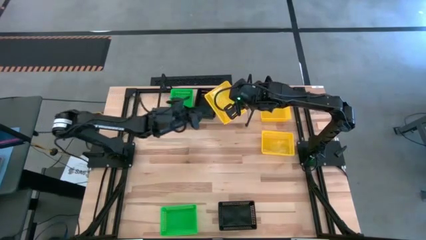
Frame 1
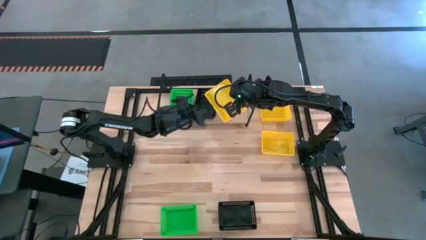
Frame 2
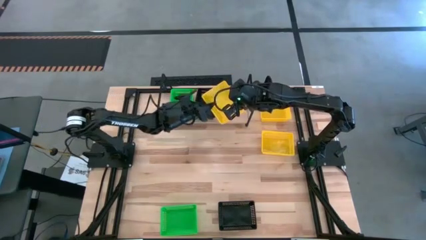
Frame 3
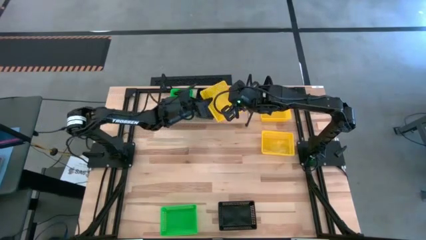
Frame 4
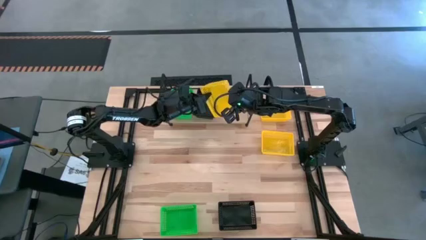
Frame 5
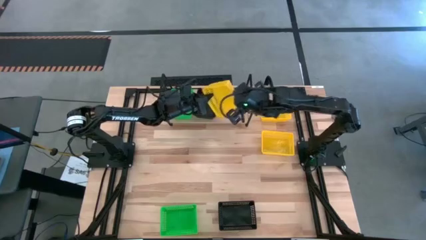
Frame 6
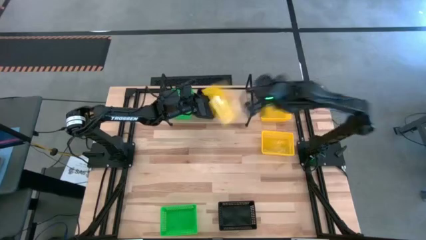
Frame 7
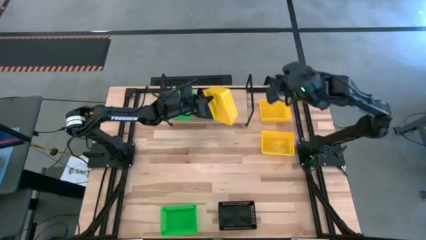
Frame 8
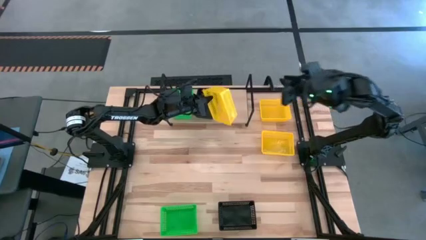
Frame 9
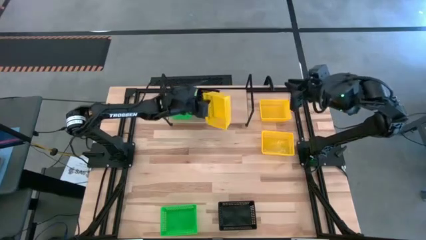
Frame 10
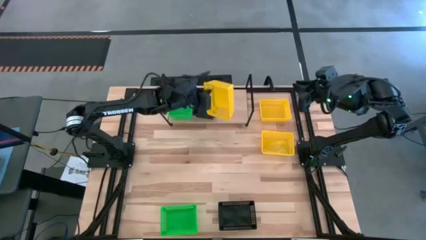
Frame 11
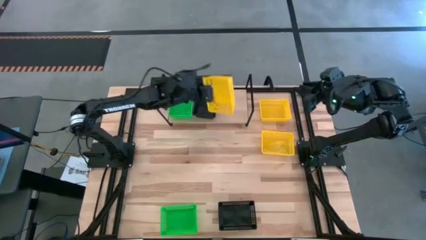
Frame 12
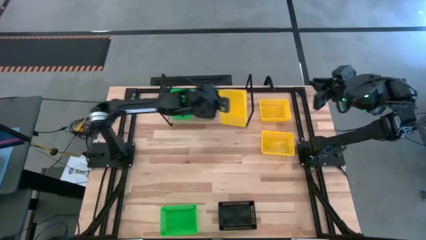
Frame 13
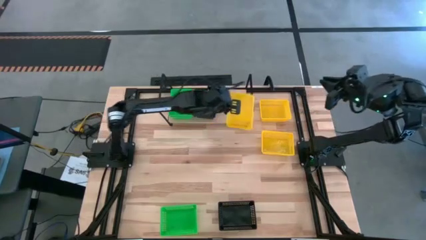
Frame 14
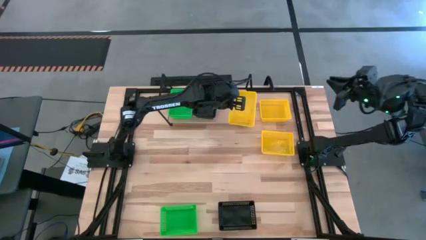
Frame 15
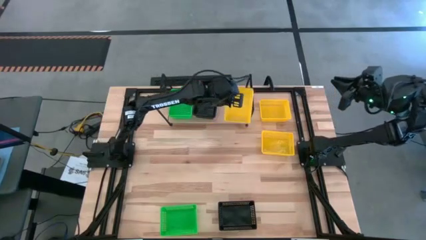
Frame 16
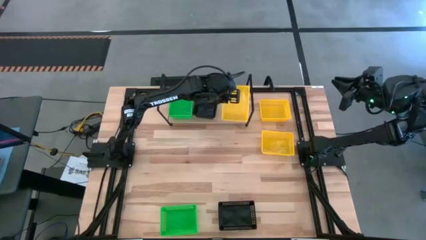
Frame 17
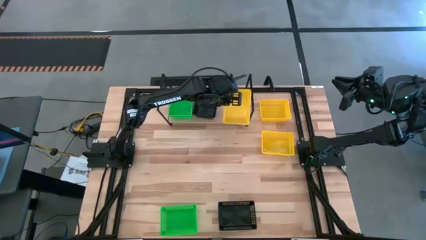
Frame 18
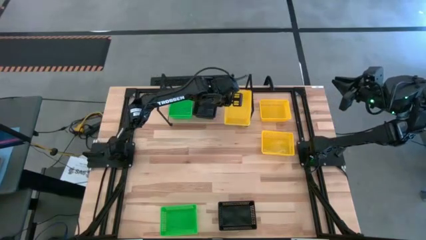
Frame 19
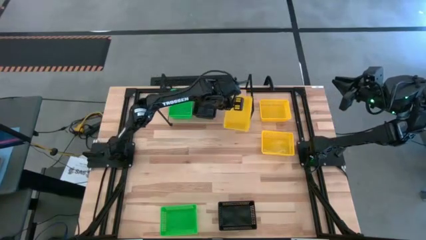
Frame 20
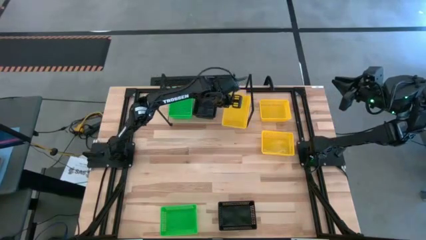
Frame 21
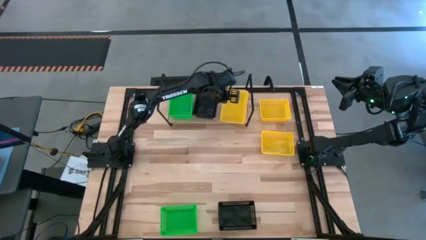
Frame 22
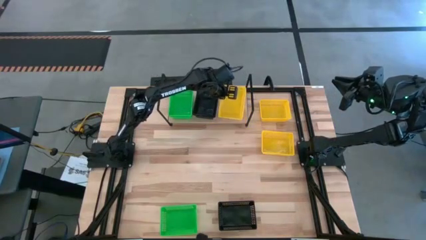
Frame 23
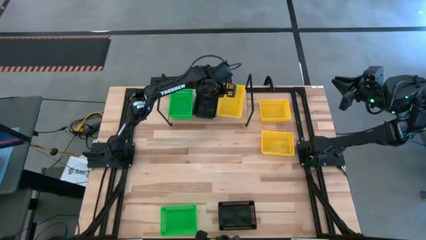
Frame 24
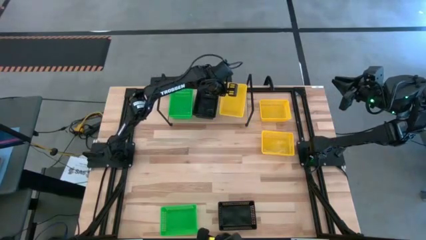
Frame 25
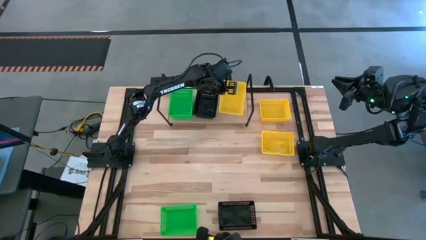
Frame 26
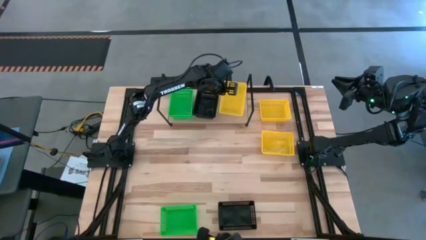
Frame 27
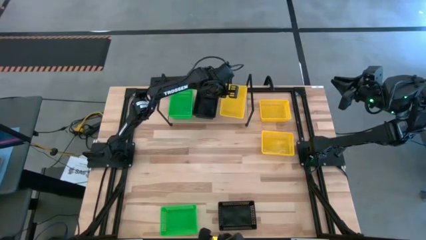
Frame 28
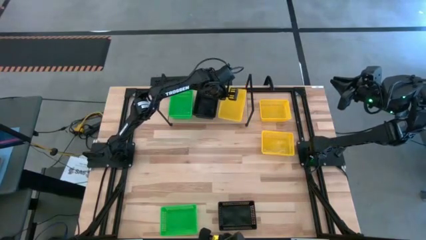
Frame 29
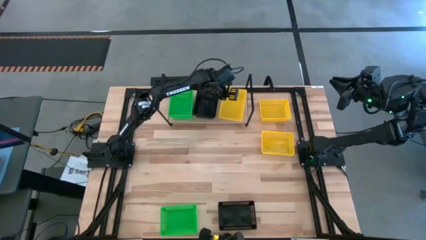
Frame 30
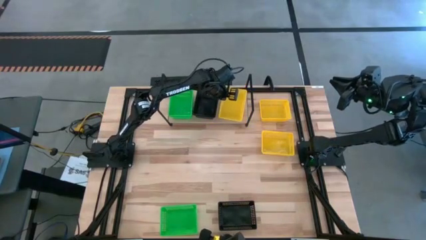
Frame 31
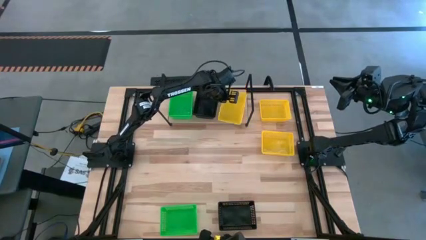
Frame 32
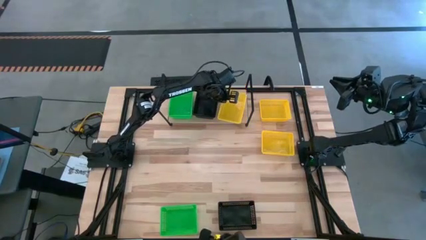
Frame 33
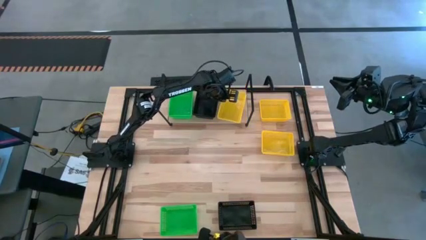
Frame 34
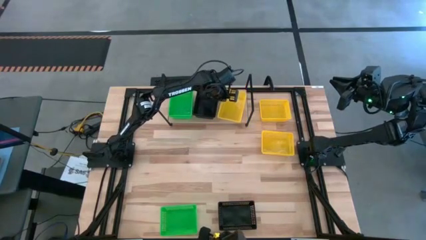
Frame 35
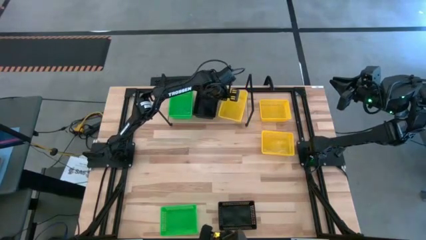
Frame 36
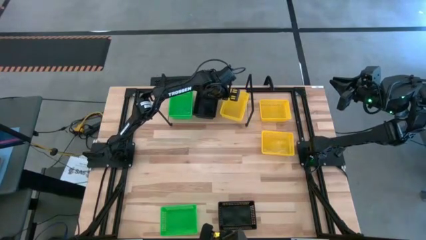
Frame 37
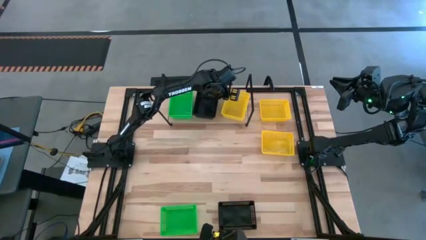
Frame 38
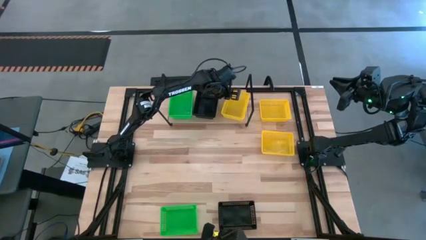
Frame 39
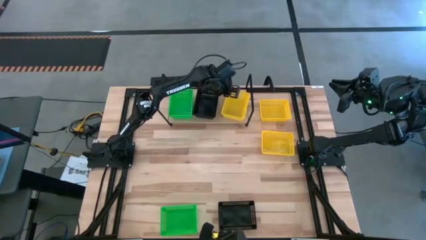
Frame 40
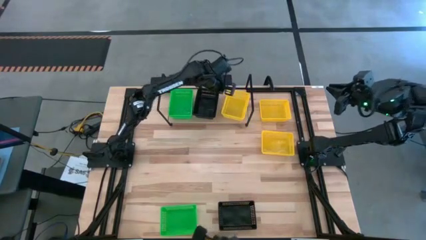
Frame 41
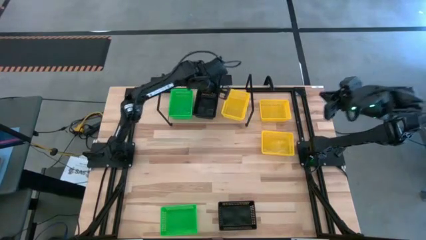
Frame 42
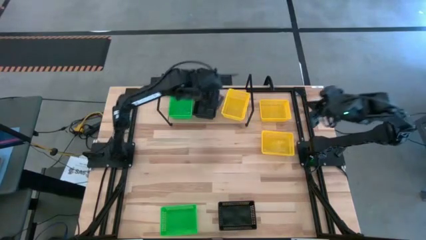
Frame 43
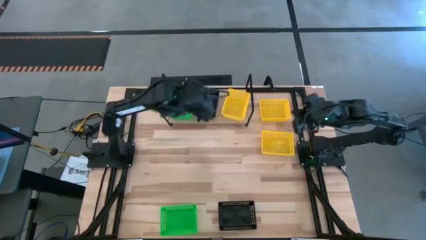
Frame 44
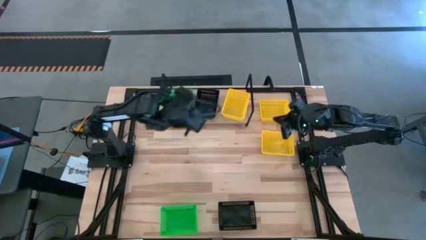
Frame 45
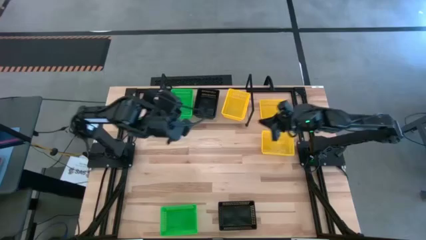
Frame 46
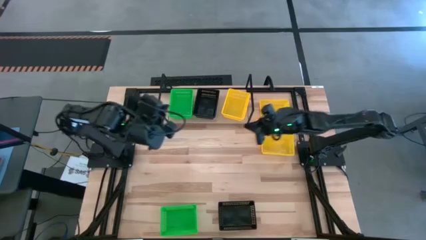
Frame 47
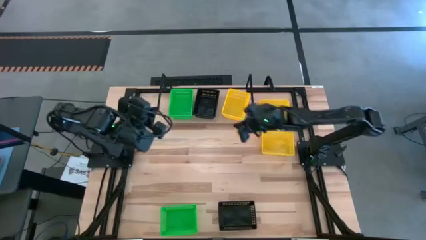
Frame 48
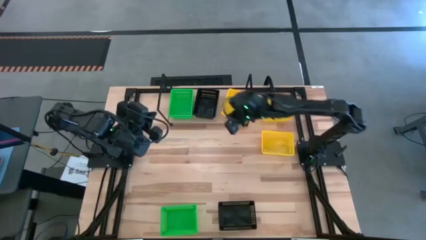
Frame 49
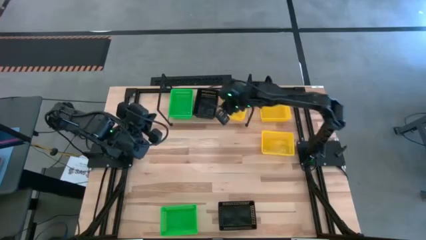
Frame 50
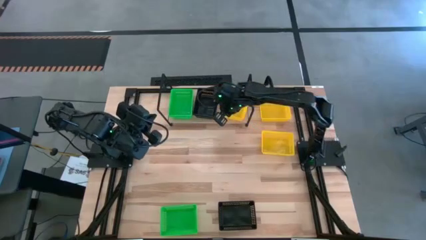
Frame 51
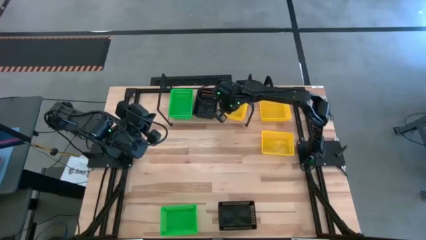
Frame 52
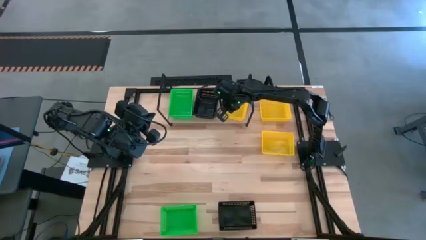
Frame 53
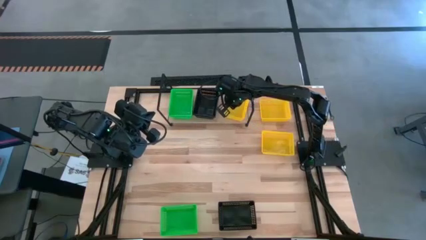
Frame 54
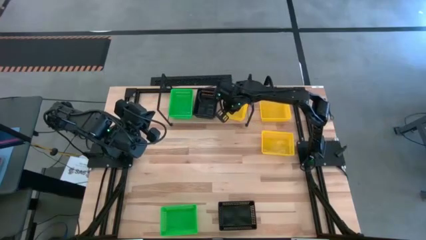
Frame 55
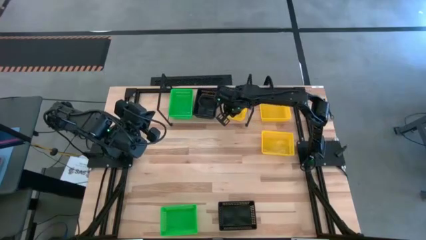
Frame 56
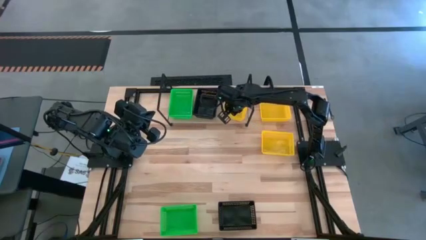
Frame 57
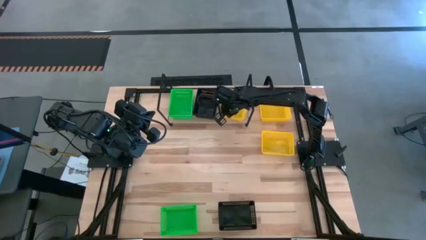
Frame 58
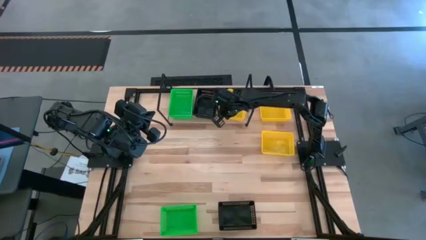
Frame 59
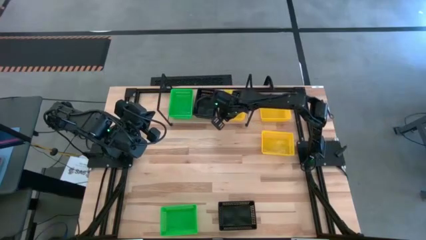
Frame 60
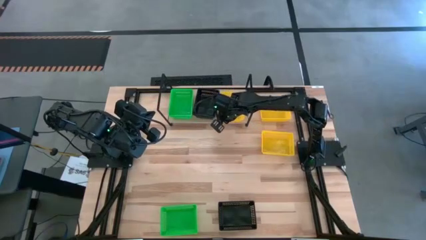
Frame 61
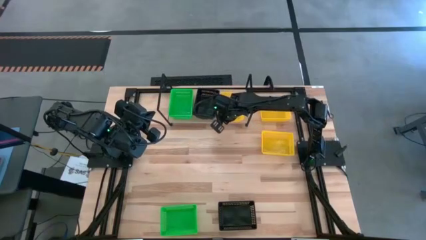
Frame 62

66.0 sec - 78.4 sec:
Task: Stack baskets on shelf by color
Put the bottom yellow basket on the shelf
